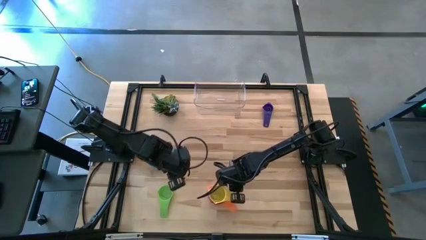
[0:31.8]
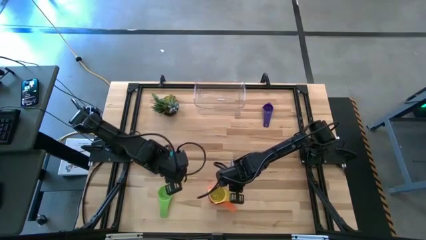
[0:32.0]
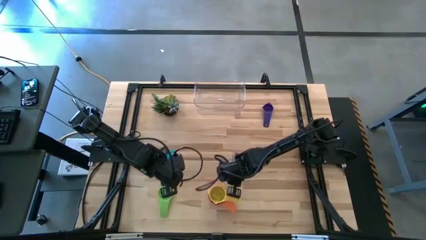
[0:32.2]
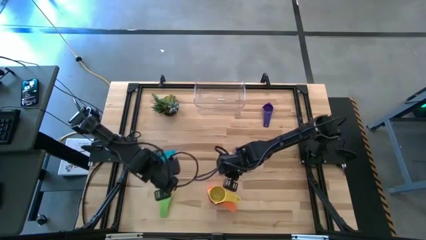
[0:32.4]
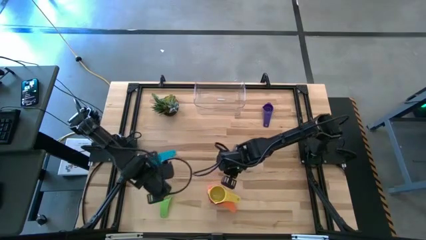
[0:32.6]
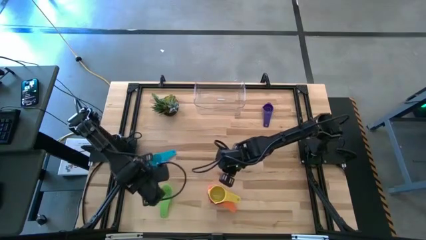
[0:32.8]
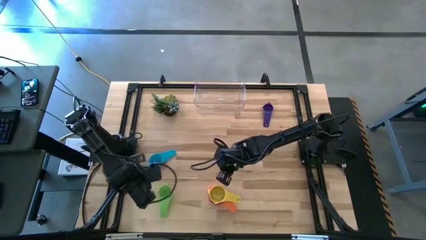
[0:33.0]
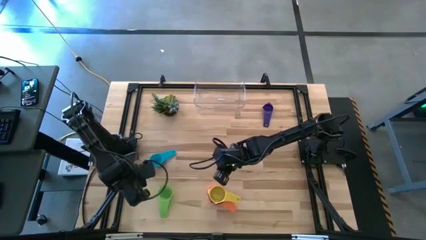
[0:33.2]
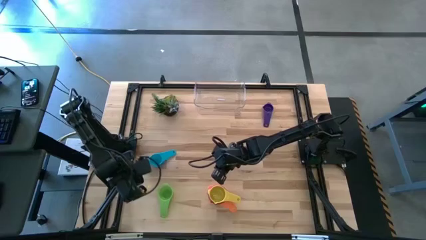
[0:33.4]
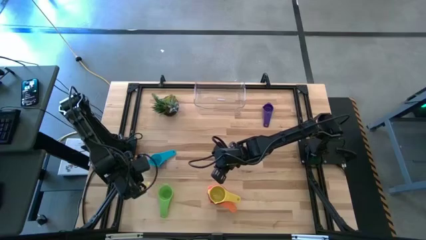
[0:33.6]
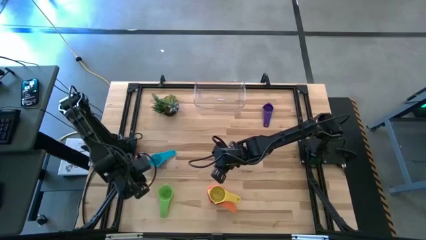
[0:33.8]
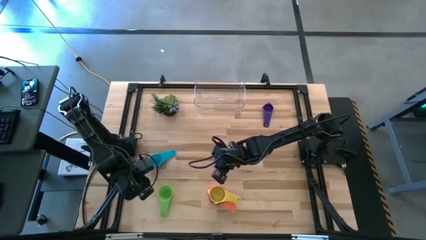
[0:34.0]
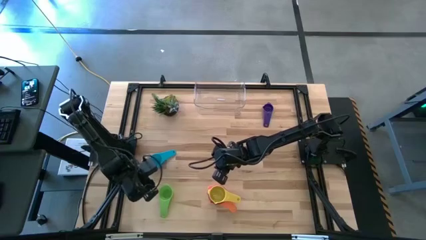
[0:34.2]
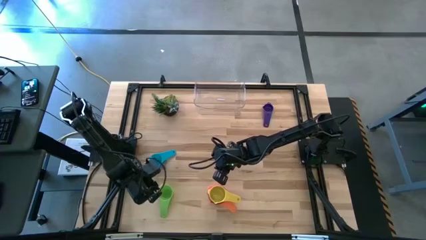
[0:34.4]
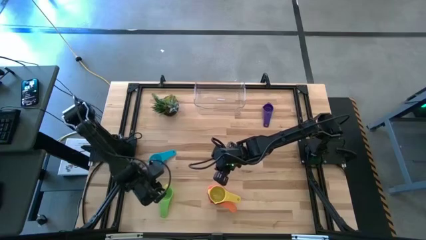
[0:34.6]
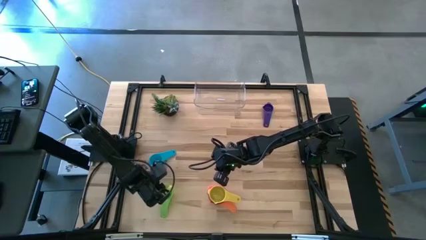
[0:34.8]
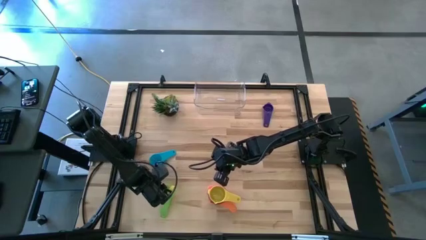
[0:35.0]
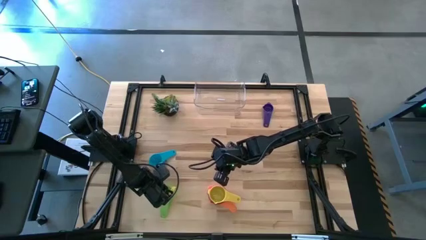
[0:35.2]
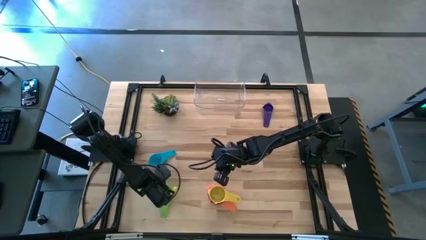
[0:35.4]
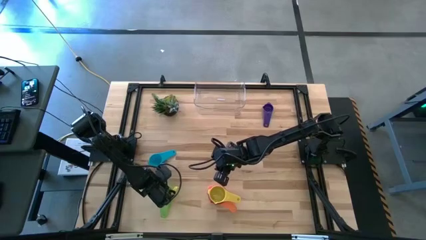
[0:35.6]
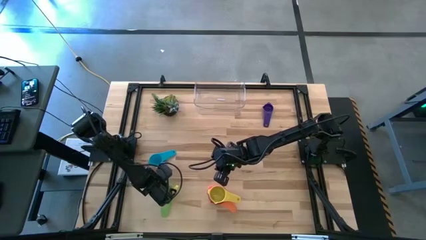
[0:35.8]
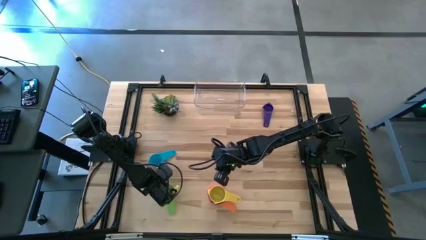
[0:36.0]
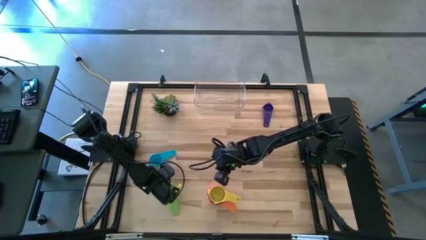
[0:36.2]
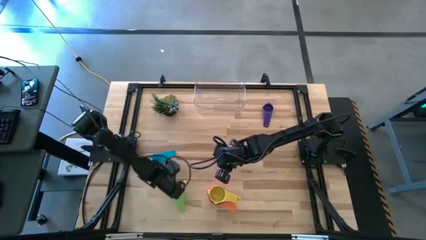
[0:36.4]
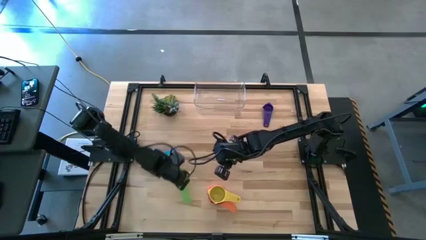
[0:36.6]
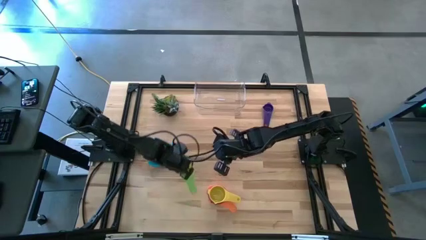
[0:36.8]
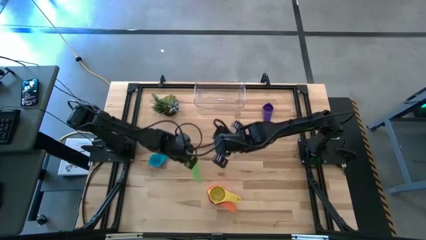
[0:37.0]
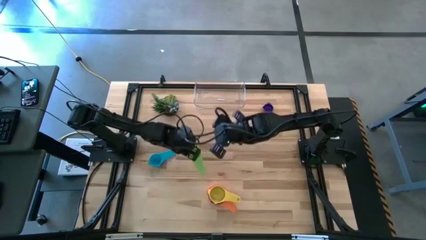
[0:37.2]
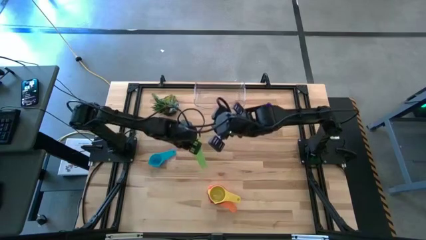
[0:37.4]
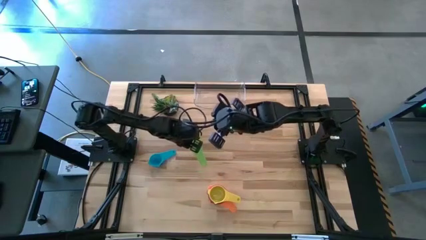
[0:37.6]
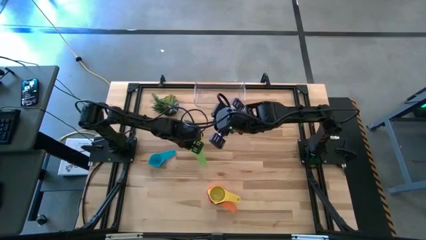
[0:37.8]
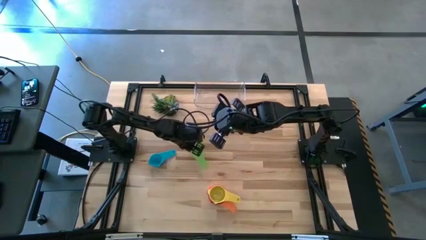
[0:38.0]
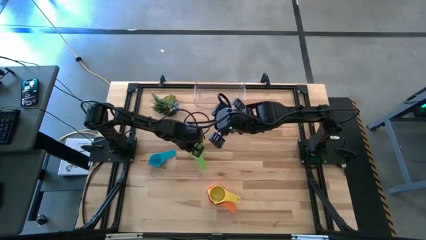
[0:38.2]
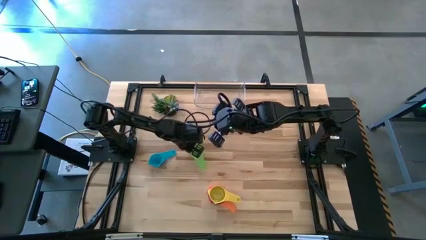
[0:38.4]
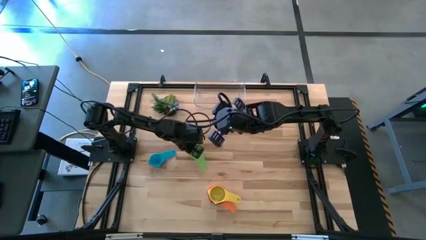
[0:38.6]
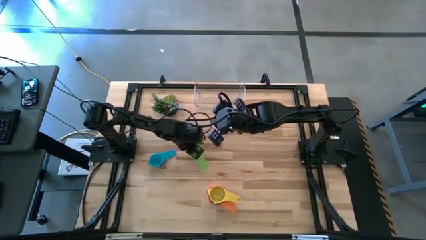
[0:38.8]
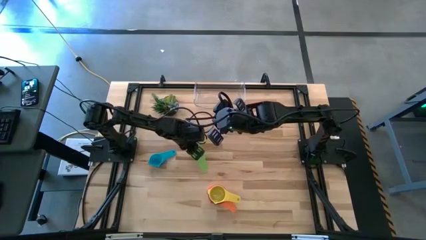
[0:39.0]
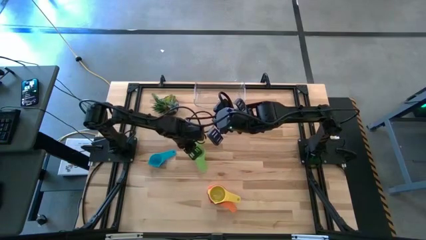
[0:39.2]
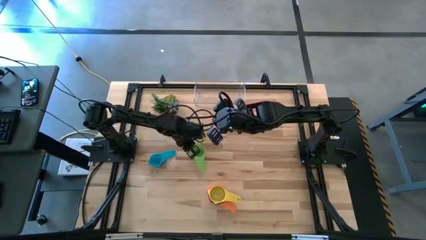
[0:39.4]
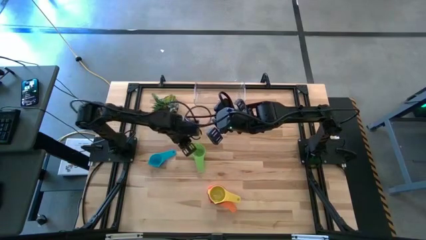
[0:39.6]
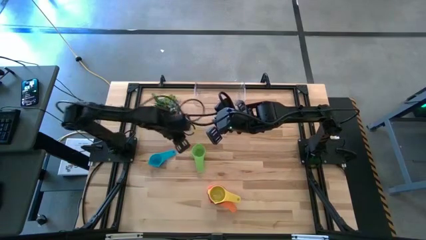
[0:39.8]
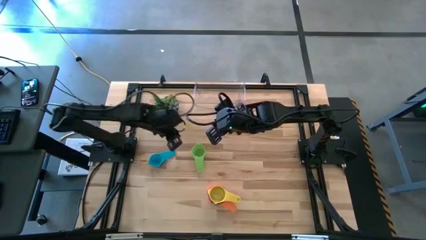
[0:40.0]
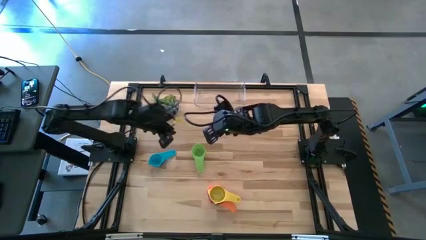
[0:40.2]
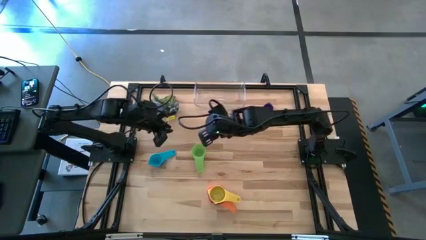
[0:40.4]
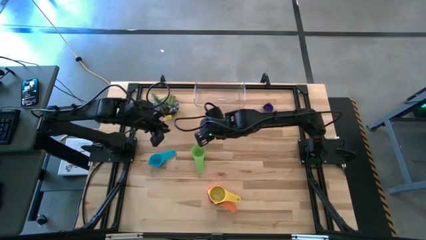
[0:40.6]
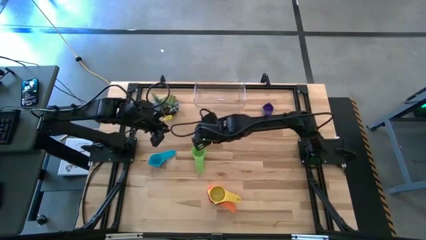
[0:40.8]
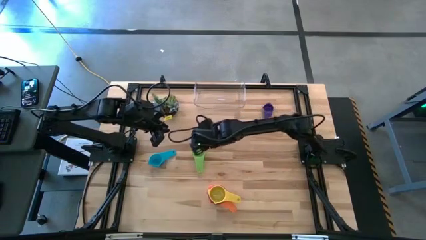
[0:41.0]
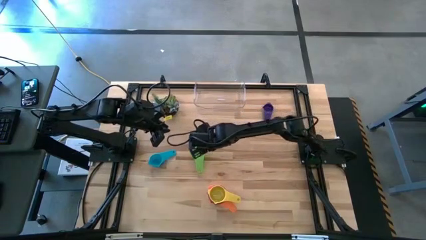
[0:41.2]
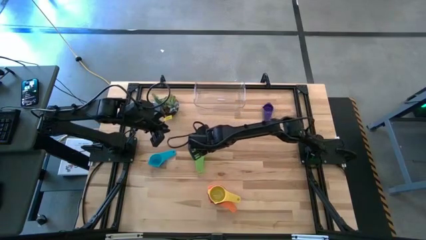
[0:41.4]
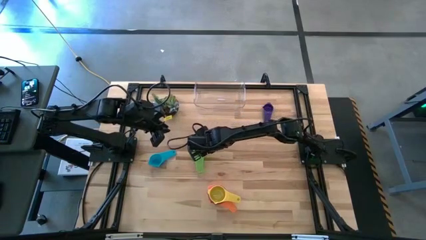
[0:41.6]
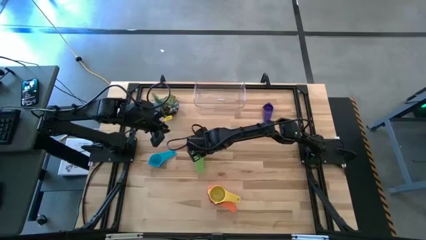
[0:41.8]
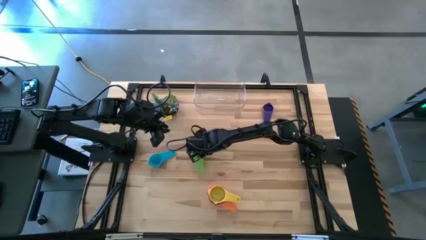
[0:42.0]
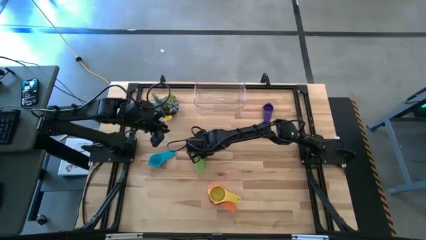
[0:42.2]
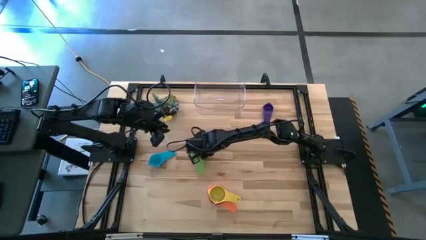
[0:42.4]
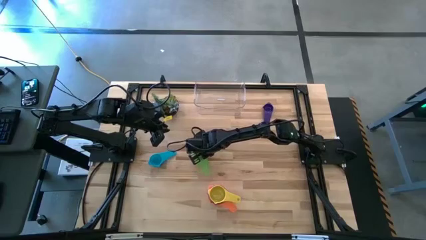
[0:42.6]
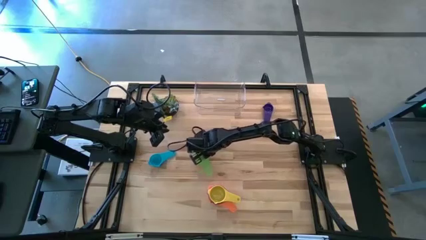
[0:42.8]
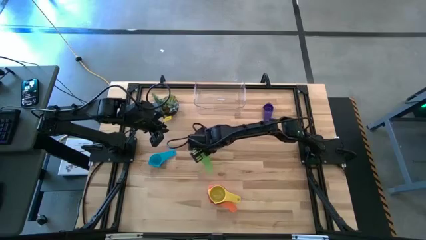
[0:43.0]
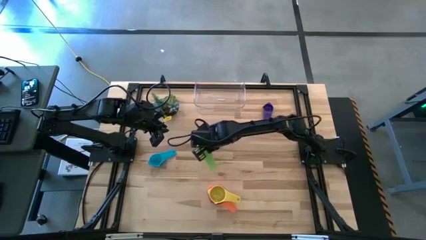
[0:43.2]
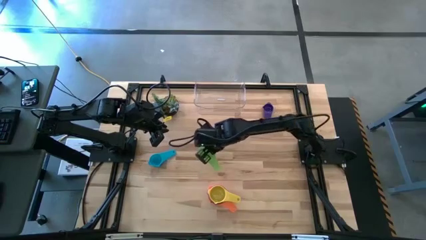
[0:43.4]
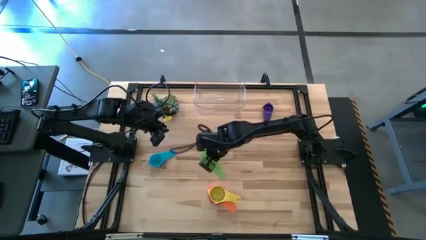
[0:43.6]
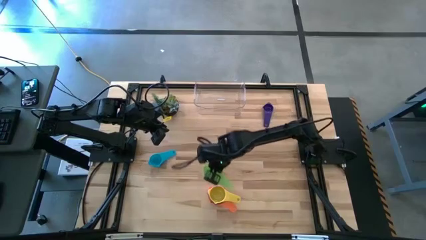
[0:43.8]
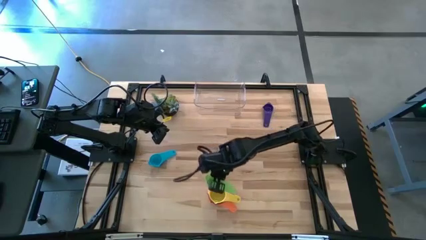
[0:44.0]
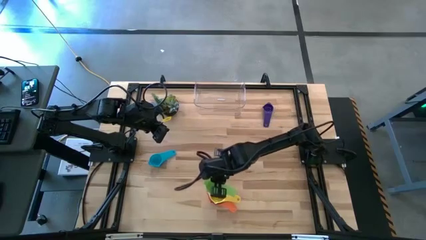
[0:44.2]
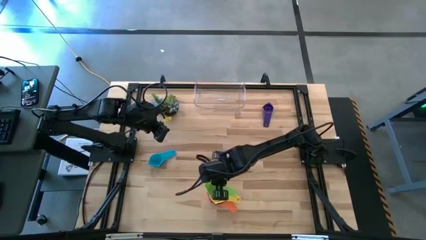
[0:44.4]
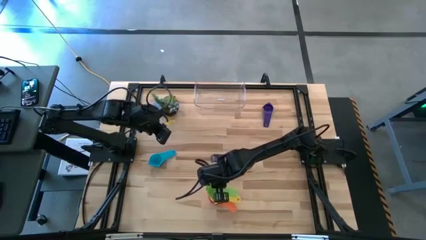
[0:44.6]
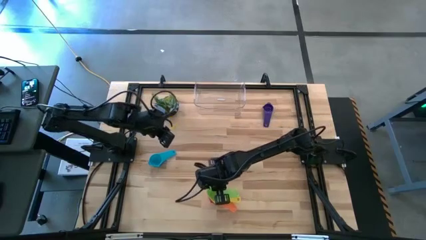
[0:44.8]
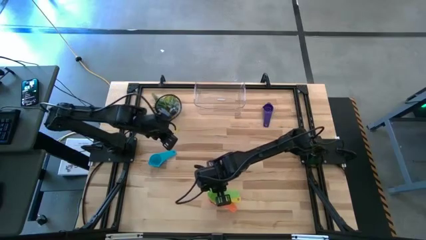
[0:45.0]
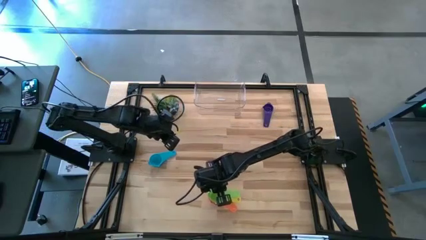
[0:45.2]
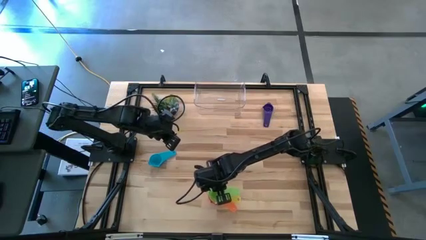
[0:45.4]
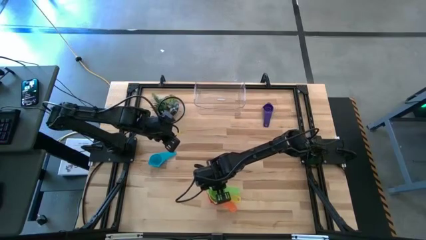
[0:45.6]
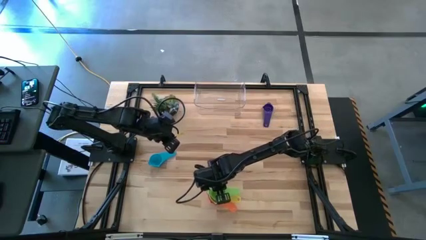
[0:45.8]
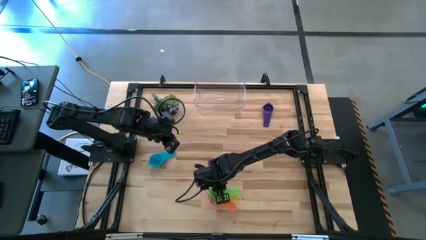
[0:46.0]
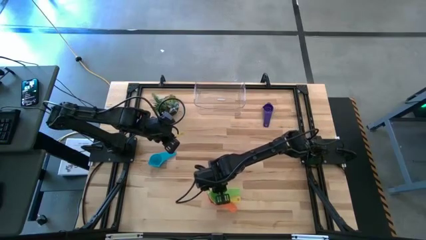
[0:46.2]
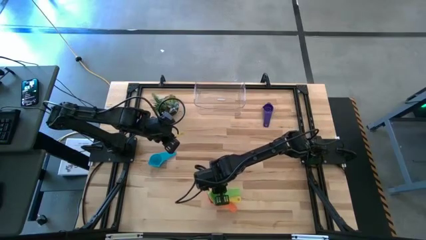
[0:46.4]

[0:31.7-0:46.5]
Task: Nest measuring cups in basket
Stack the green measuring cup on the yellow measuring cup
